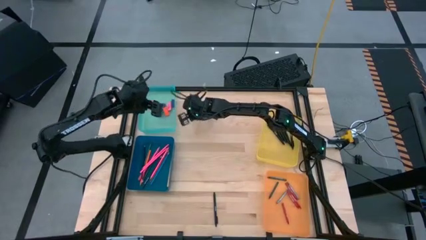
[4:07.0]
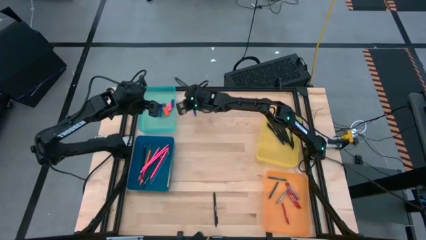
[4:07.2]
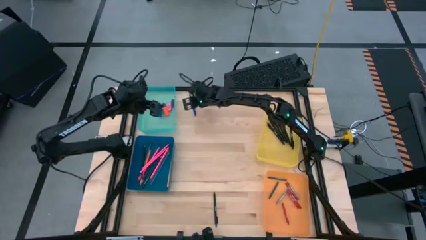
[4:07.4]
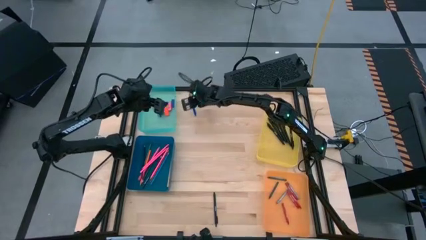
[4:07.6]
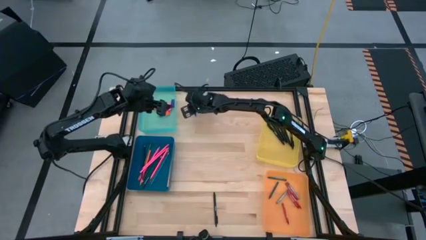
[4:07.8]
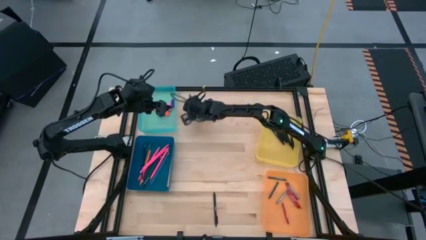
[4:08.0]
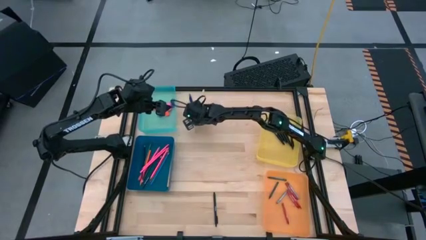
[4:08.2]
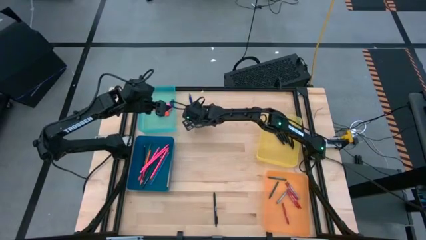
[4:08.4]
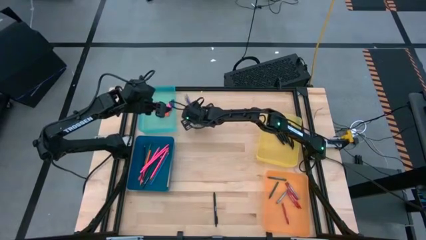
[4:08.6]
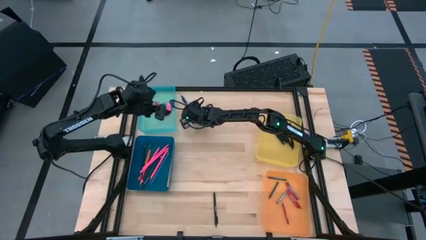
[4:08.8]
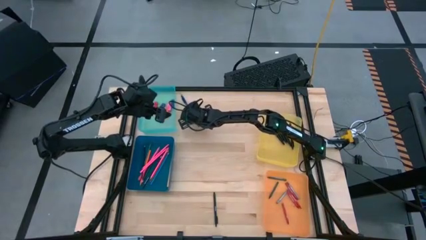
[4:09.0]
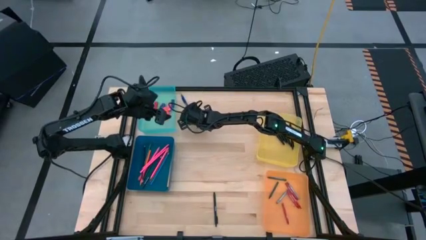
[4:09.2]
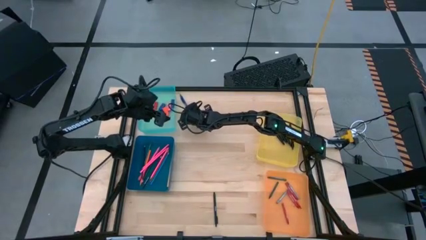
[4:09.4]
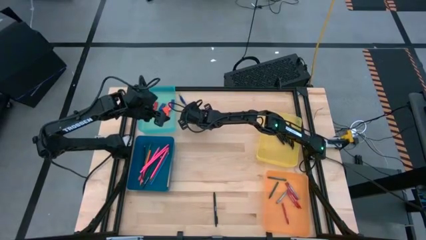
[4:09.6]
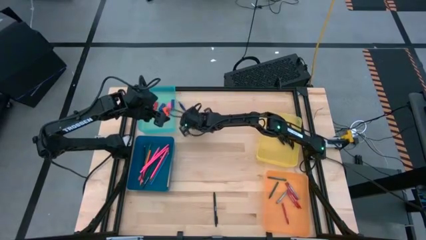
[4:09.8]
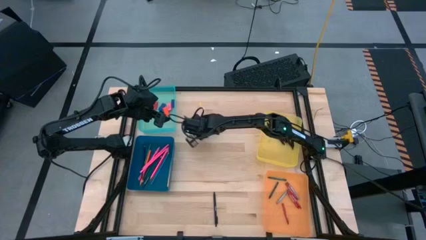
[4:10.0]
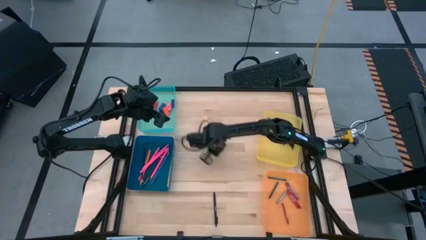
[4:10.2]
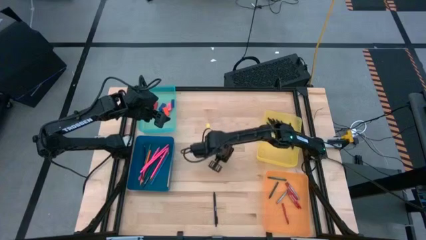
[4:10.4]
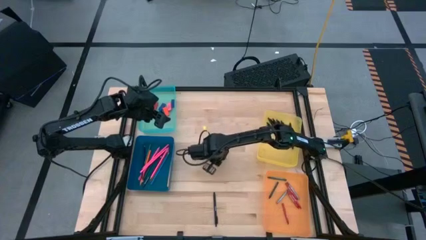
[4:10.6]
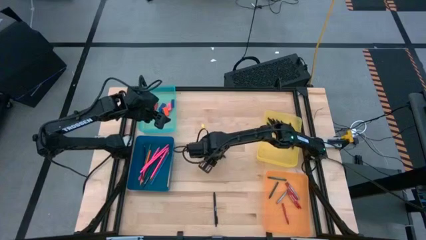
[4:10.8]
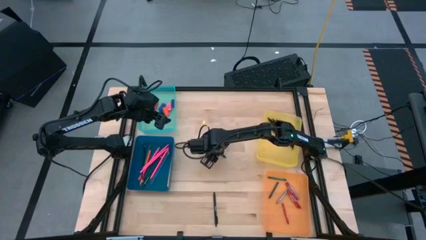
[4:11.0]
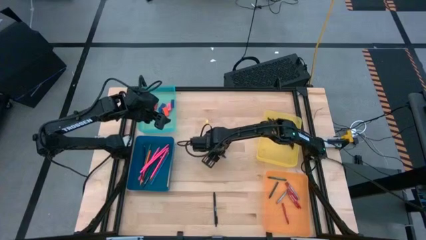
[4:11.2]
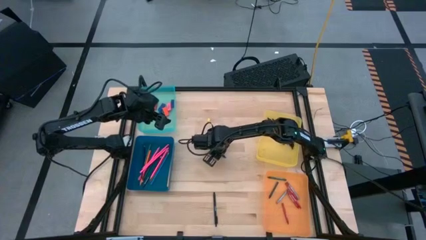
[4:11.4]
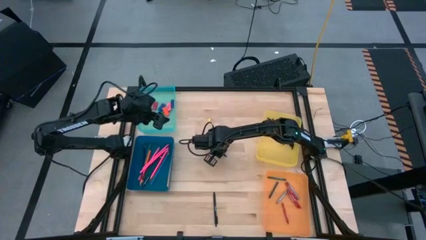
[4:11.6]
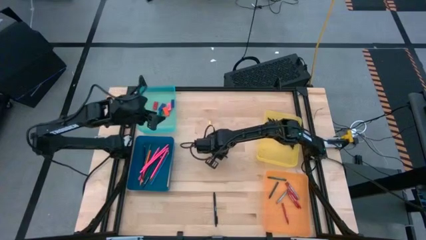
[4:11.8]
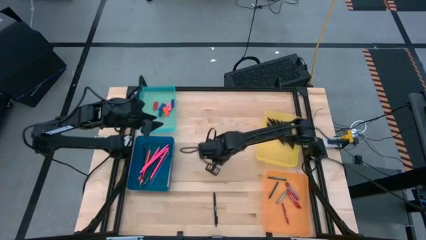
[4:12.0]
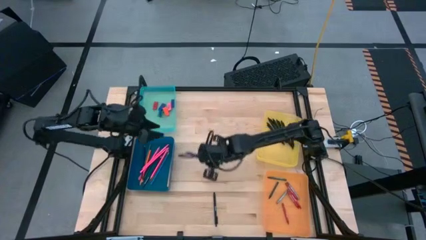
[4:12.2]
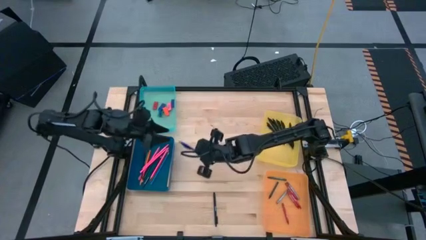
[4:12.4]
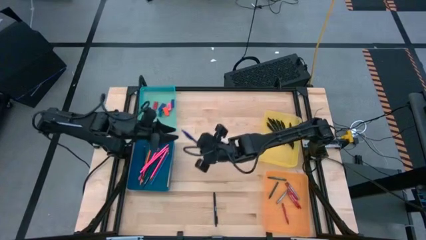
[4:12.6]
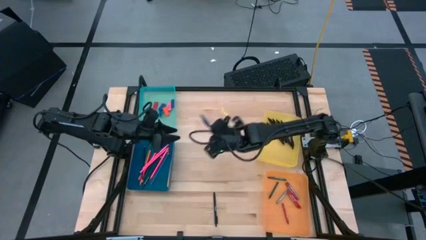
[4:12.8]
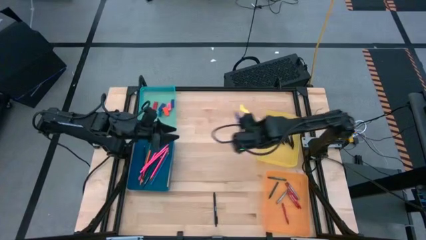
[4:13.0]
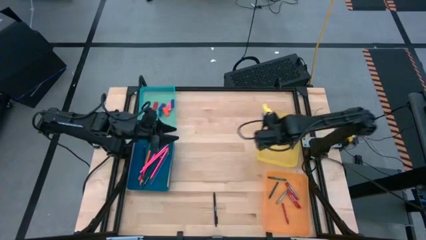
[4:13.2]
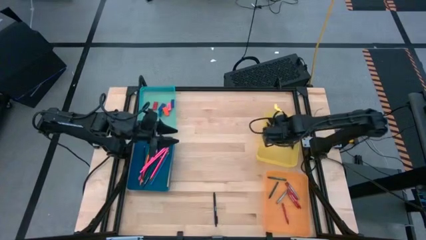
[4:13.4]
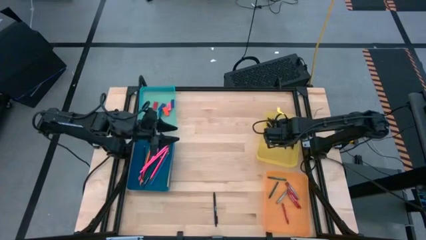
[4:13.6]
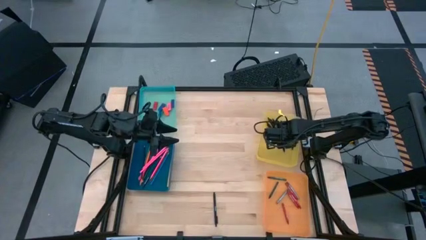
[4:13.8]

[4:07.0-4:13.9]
Task: Sort crayons/erasers/pens/pencils in bins
Put the blue pen into the yellow bin

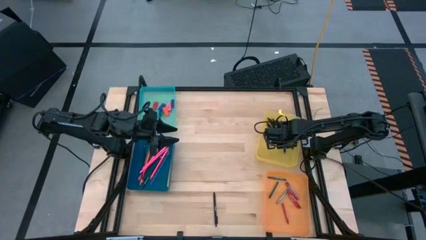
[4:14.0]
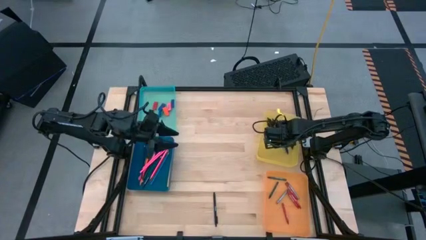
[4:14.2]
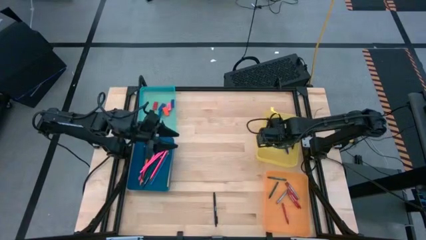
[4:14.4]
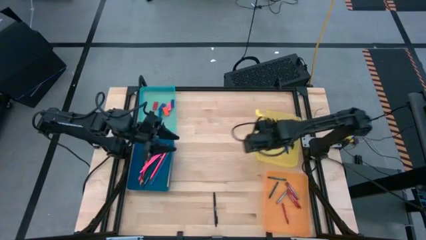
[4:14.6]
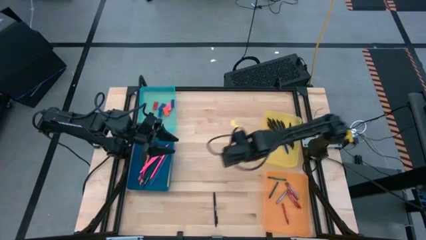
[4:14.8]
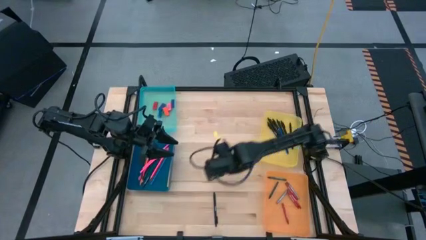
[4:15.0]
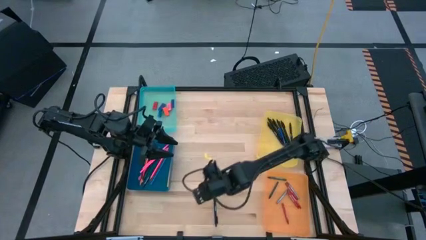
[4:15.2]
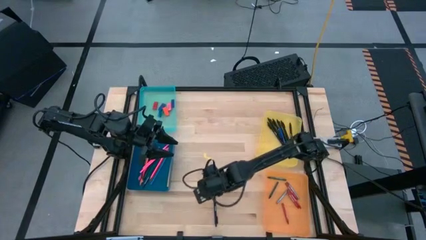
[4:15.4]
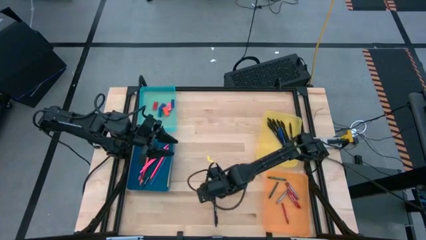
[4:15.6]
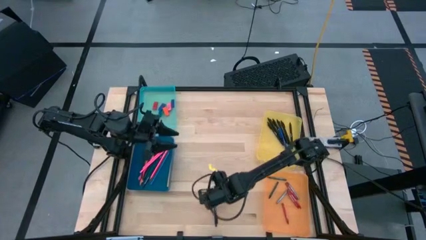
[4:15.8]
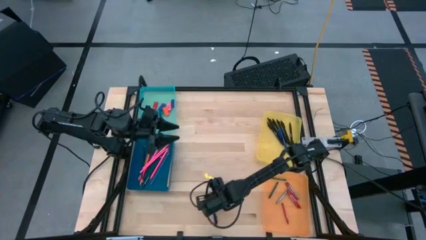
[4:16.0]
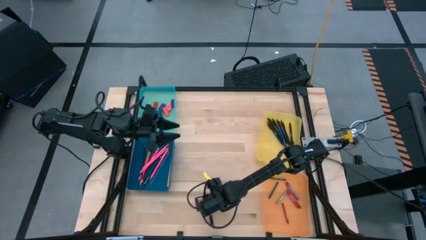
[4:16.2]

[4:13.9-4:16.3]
Put the black pen into the yellow bin

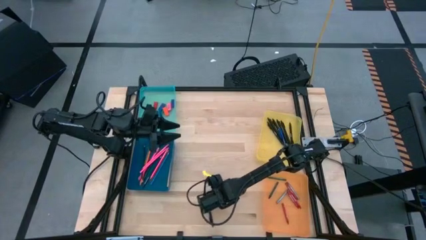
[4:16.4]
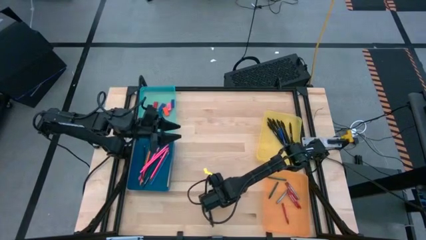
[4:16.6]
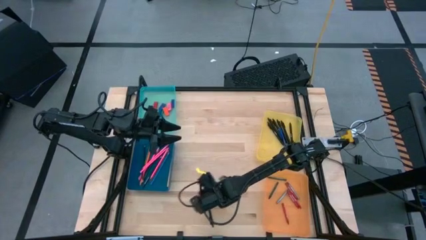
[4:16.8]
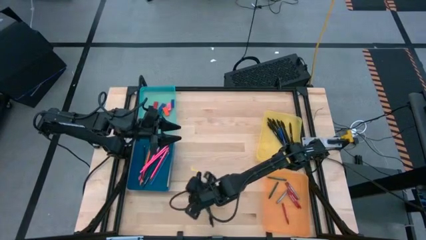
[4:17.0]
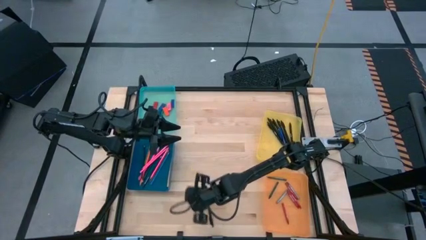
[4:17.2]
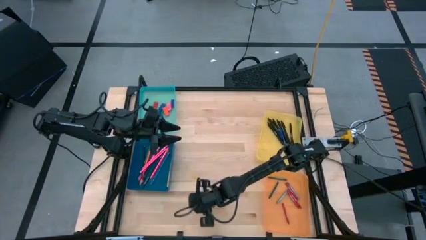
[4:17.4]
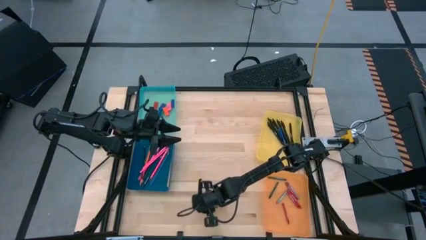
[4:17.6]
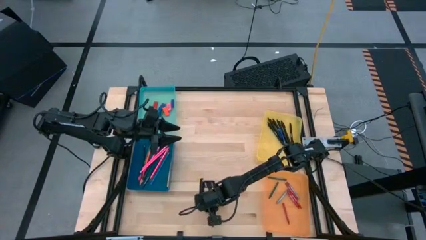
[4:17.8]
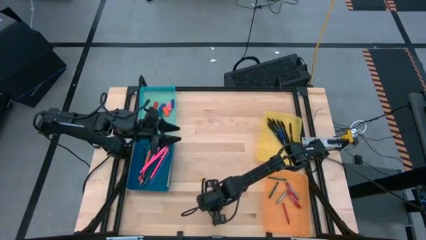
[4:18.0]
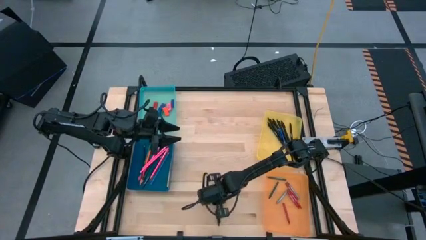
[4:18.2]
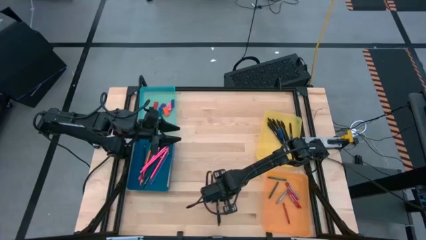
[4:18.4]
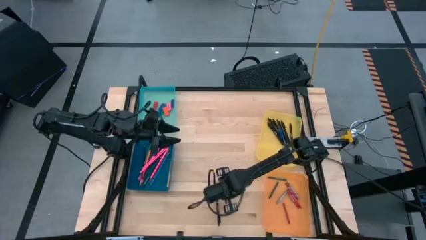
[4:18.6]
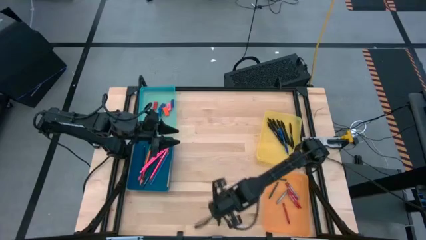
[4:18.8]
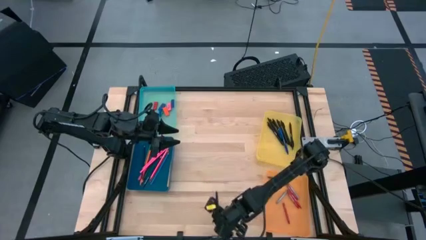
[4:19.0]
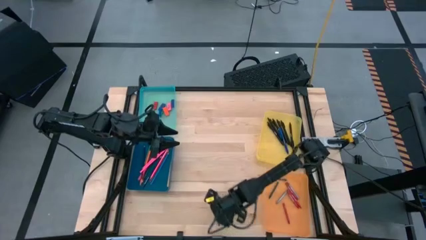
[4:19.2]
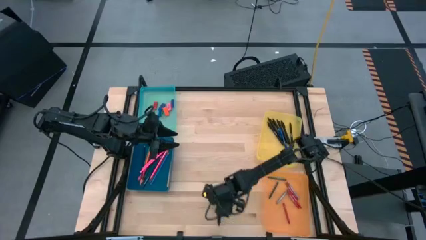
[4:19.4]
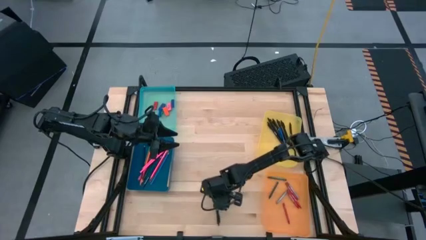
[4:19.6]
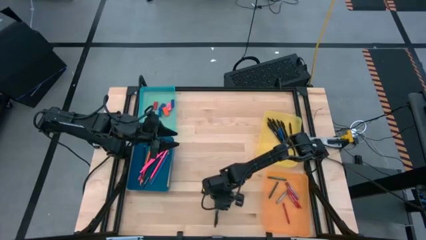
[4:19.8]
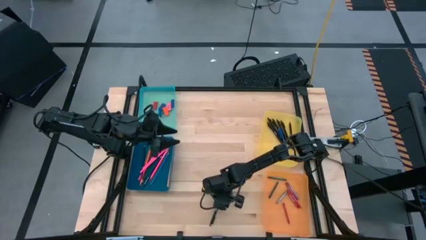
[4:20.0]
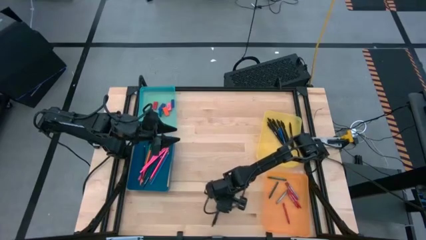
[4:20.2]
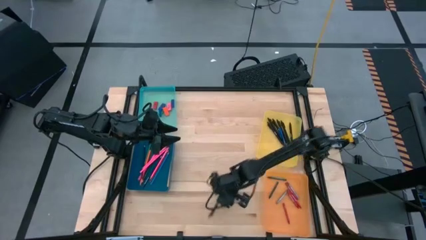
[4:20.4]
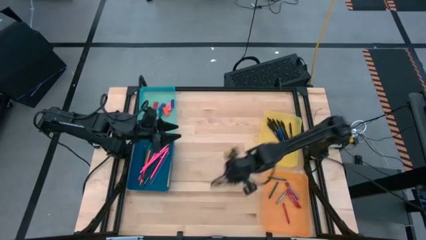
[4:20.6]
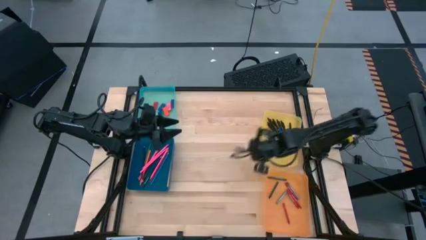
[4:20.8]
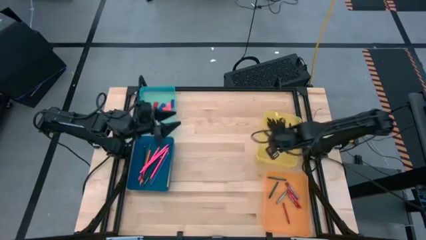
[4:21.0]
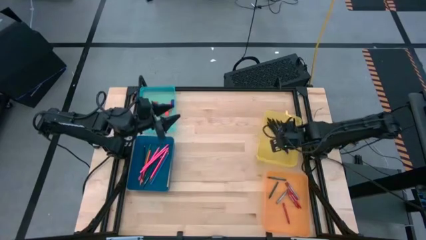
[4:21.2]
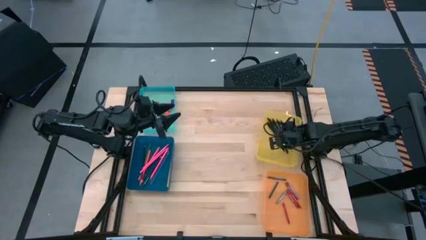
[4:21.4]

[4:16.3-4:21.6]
Put the black pen into the yellow bin

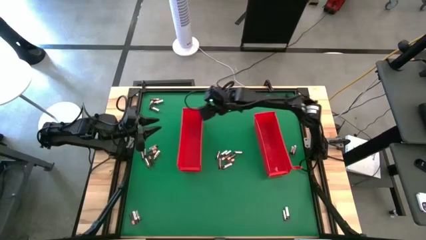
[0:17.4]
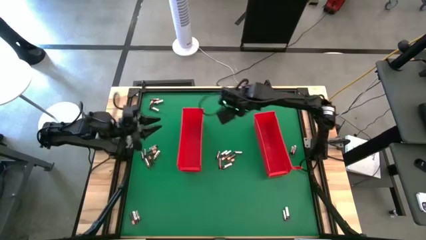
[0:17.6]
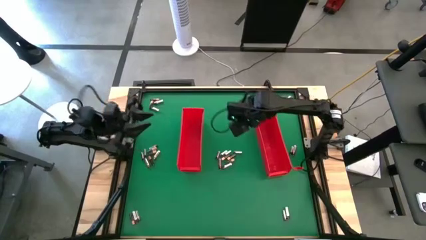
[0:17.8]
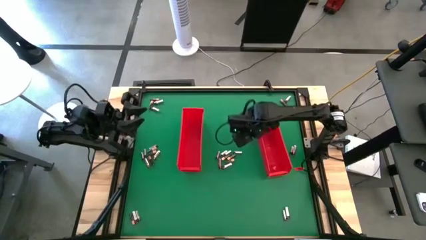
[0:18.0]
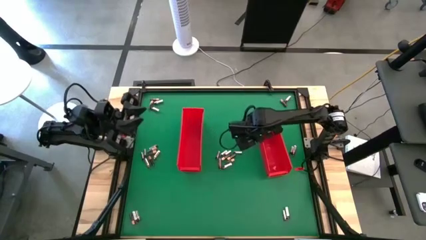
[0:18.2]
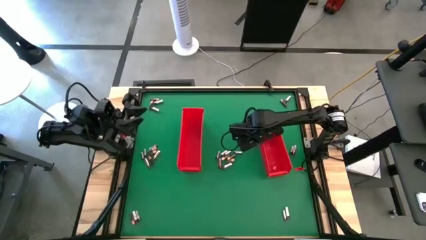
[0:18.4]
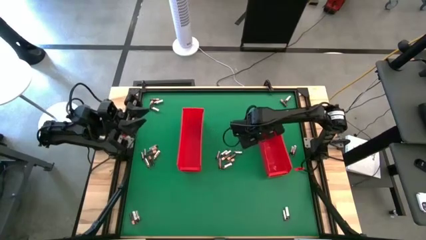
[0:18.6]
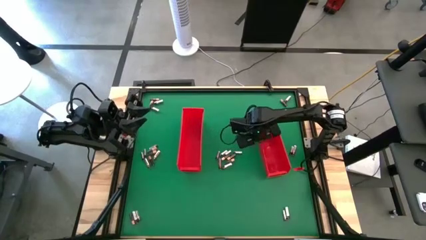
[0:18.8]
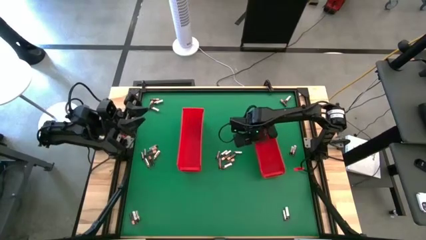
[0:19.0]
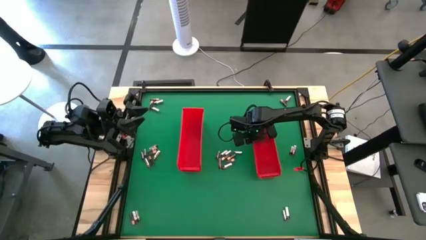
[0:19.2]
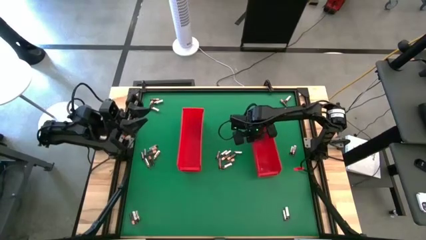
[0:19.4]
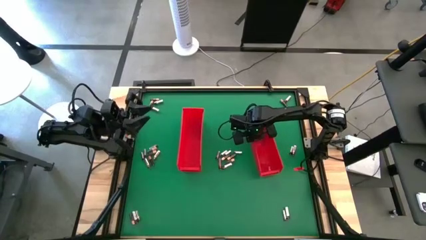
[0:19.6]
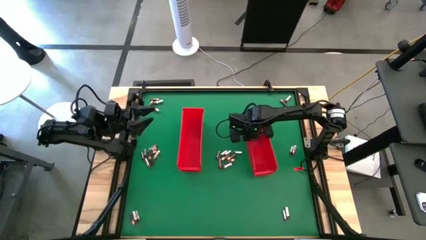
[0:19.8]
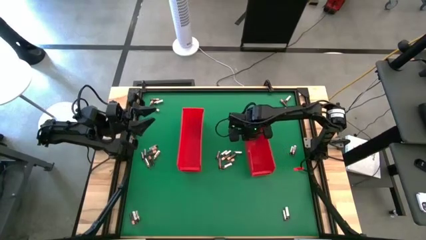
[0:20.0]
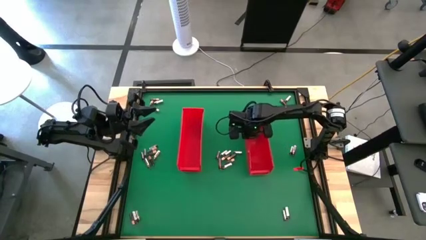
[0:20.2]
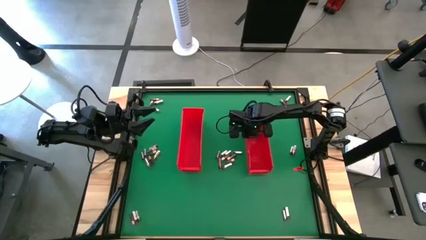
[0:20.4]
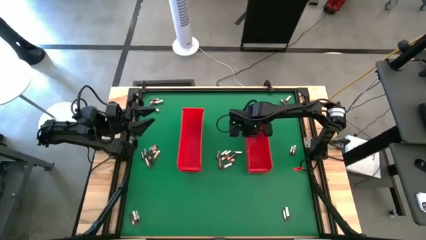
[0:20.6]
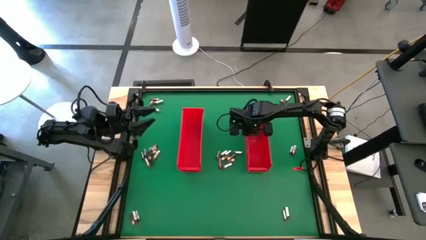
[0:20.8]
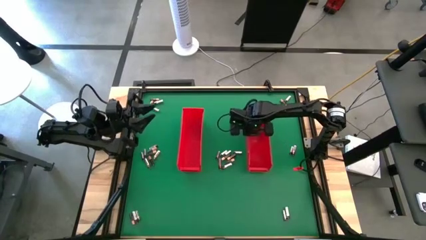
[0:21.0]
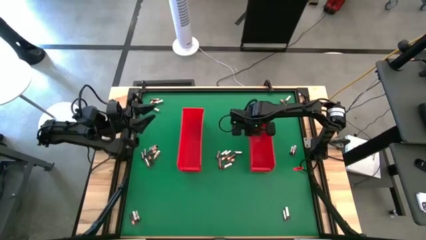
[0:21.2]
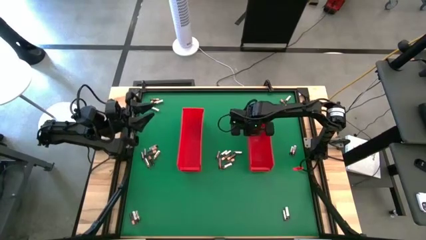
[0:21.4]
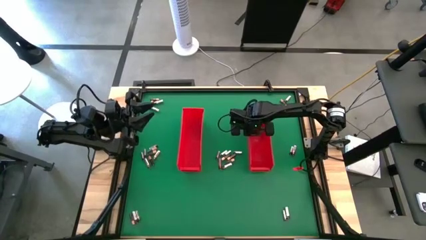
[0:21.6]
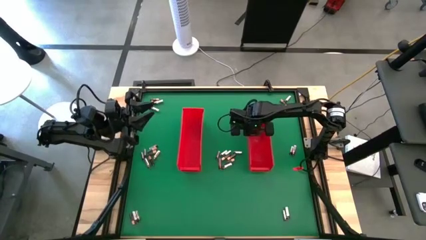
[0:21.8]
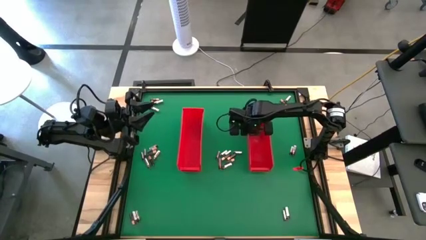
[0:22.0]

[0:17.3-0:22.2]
Task: Sort batteries
Adjust the right red bin
